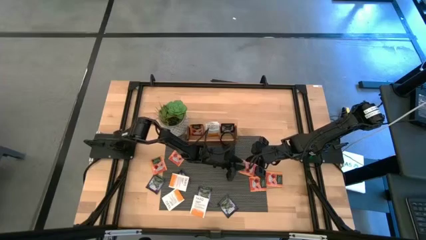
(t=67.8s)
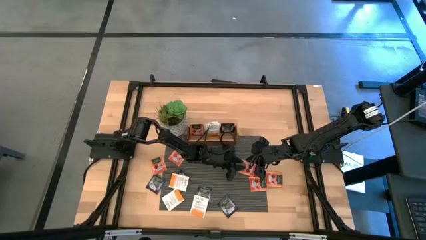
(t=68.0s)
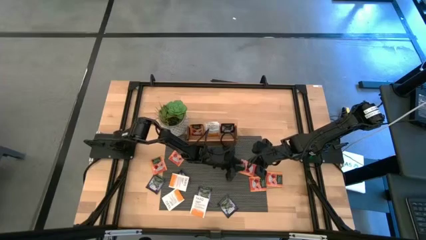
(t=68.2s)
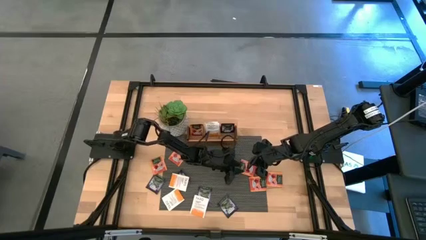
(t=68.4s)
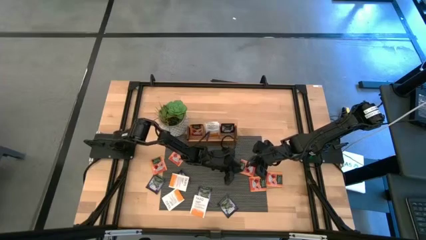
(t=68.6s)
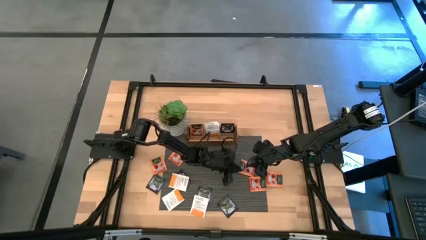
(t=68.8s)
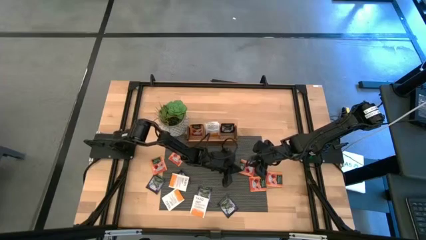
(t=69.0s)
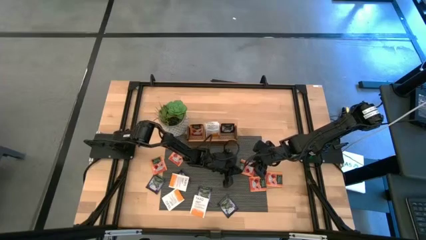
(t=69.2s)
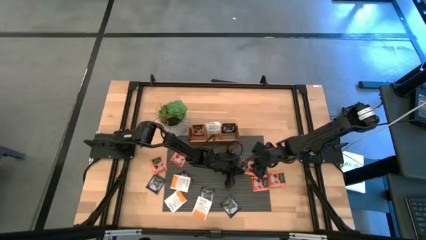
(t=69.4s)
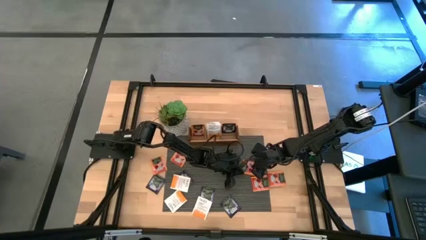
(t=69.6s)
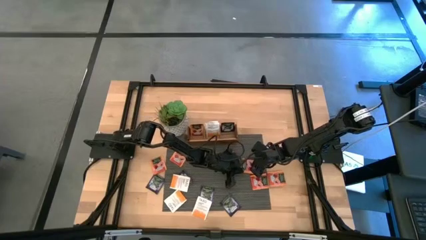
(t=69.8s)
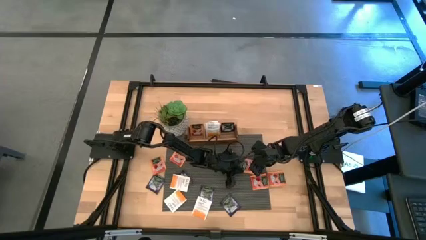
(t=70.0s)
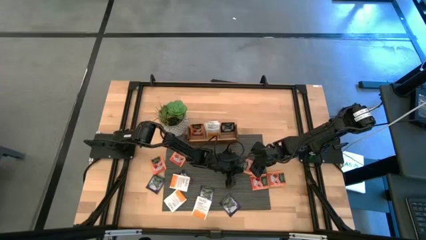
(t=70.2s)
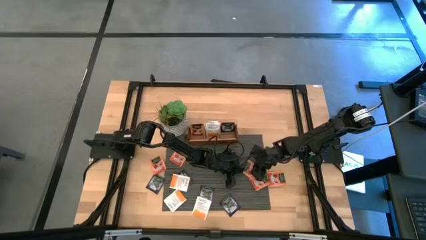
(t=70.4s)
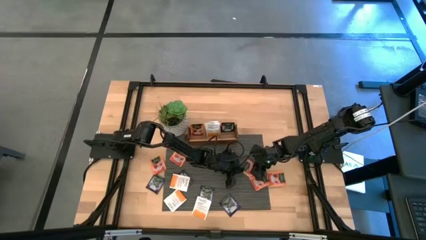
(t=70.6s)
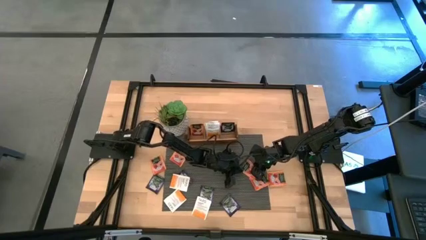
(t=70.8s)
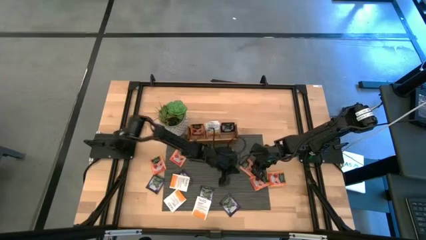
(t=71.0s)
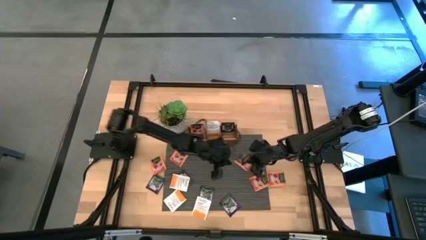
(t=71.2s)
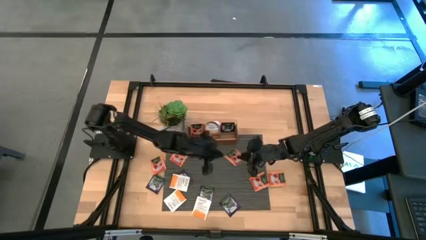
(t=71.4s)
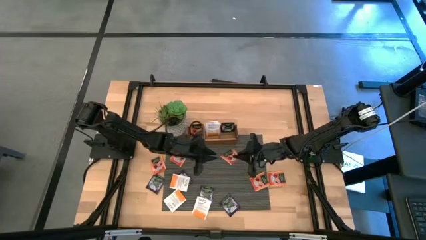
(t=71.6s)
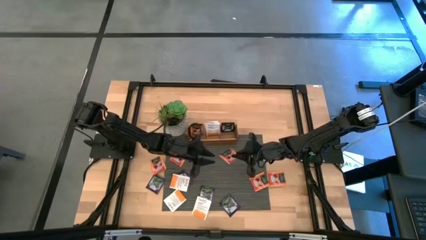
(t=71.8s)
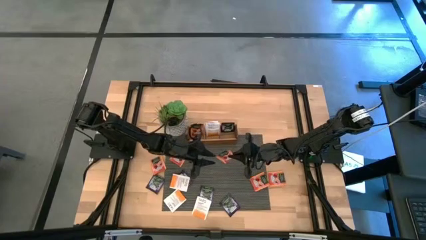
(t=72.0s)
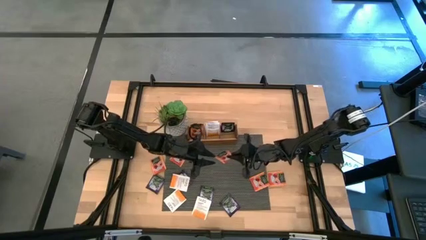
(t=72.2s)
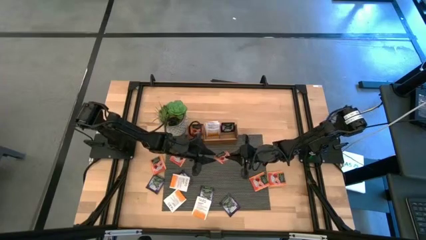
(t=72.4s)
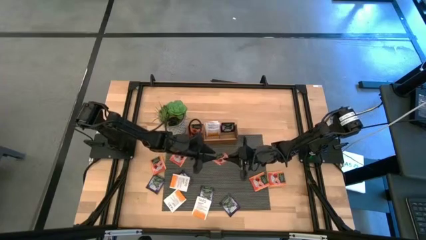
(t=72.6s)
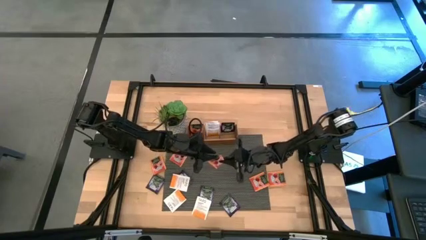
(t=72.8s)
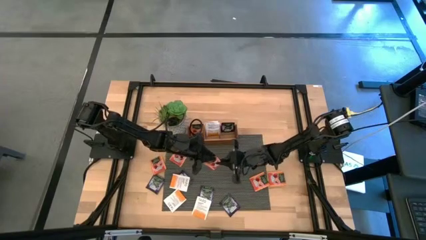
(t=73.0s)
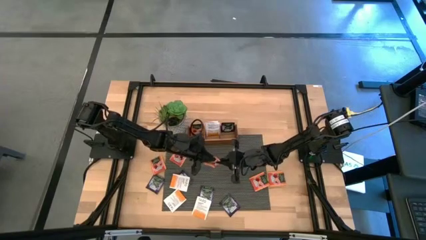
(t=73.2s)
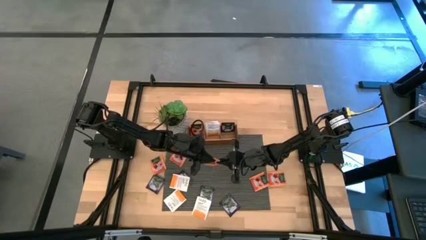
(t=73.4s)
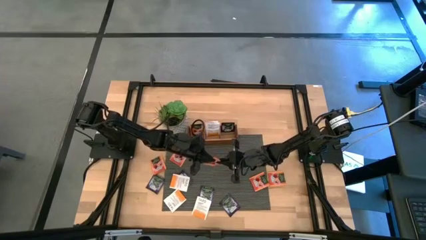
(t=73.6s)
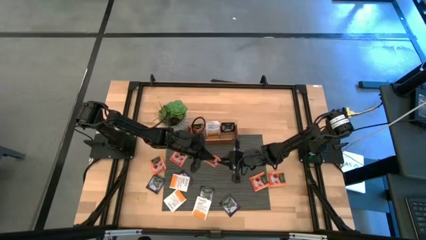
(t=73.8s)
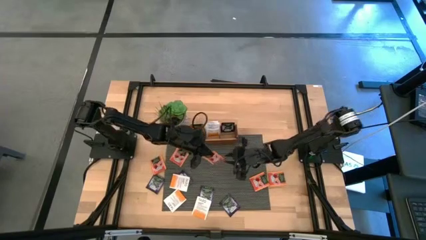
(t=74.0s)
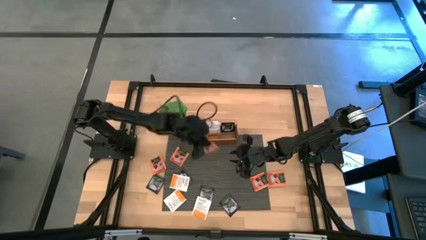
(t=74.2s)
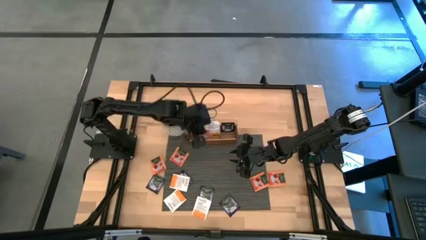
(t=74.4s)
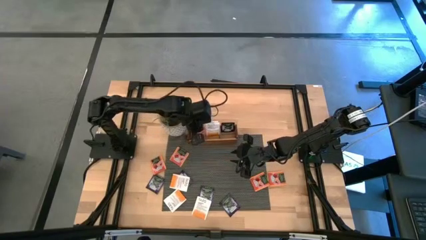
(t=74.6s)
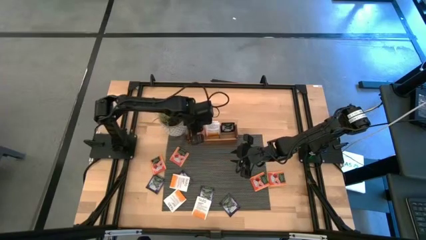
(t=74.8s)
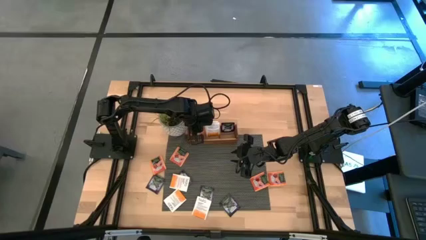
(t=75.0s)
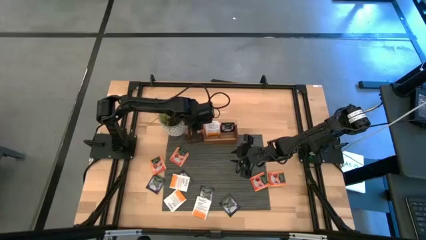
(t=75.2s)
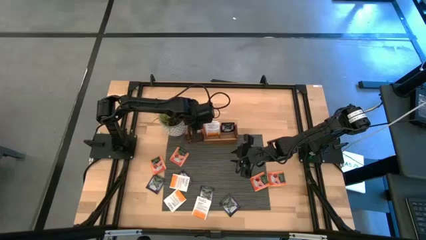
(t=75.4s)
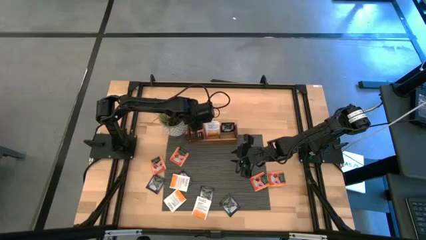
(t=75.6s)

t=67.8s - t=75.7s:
Task: Pick & Place Tea
Put the orange tea bag into the left slot of the wooden organizer

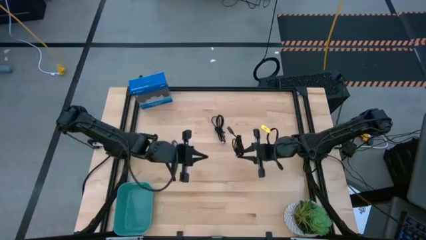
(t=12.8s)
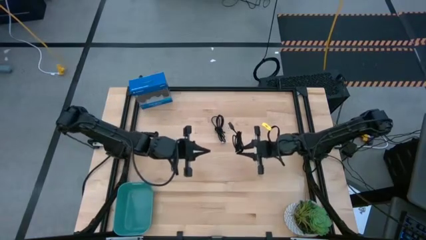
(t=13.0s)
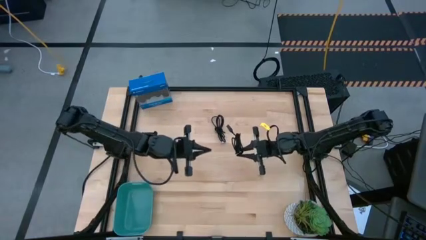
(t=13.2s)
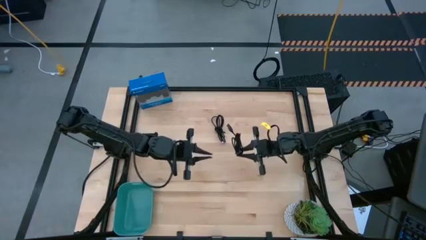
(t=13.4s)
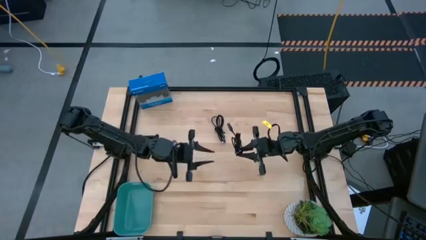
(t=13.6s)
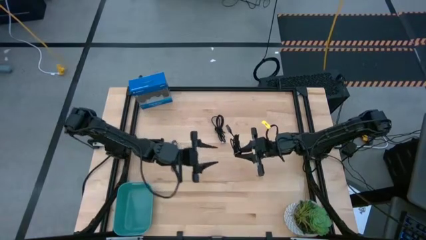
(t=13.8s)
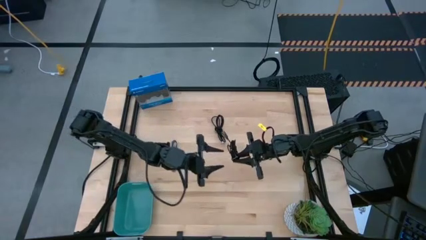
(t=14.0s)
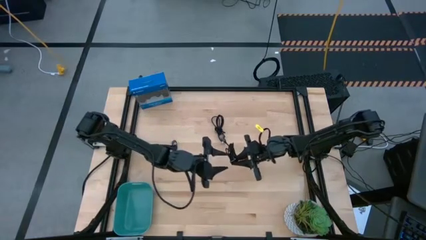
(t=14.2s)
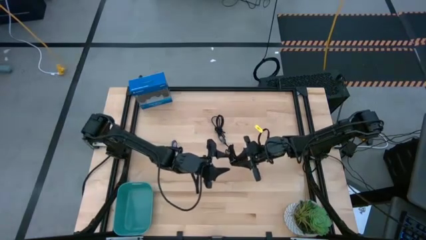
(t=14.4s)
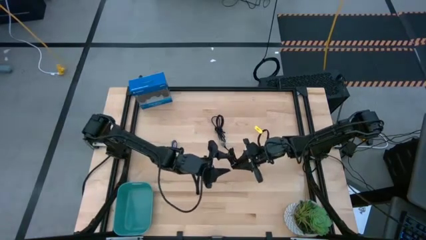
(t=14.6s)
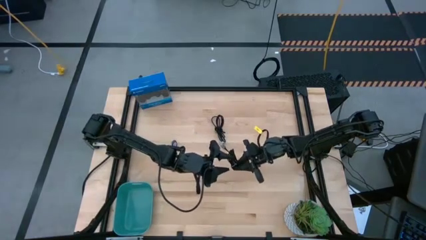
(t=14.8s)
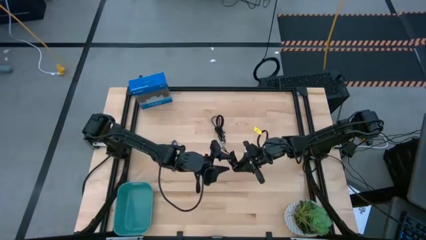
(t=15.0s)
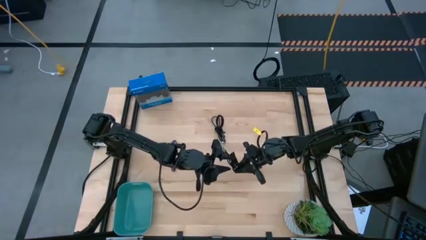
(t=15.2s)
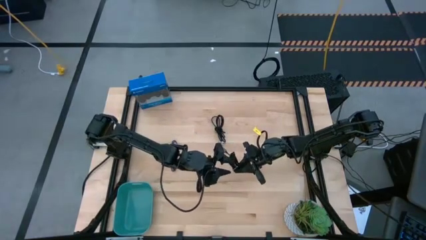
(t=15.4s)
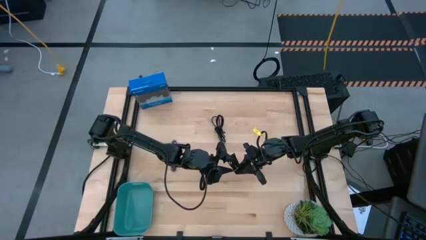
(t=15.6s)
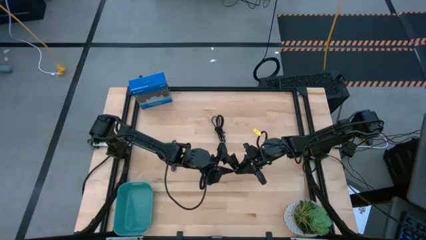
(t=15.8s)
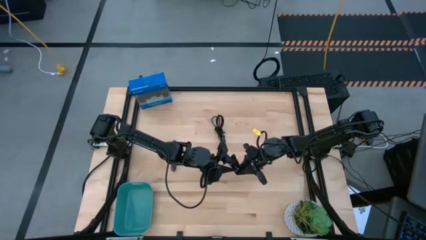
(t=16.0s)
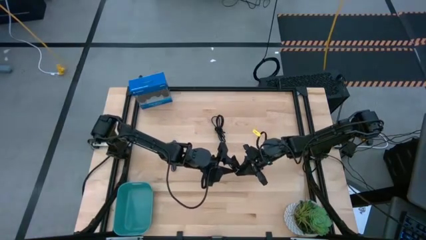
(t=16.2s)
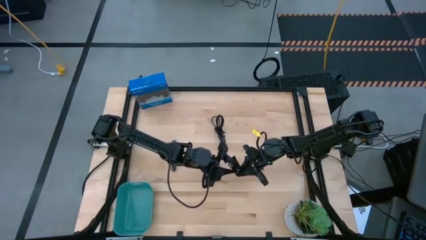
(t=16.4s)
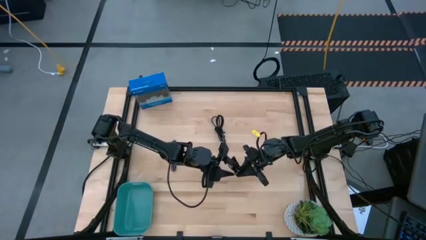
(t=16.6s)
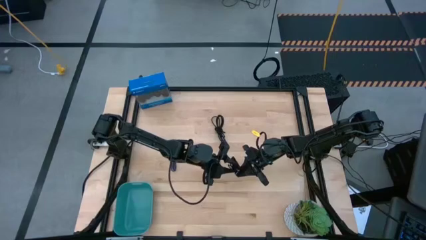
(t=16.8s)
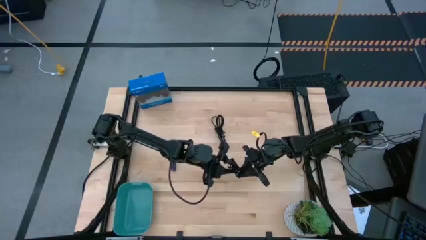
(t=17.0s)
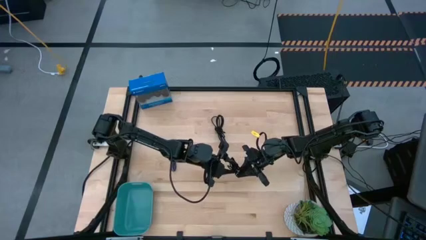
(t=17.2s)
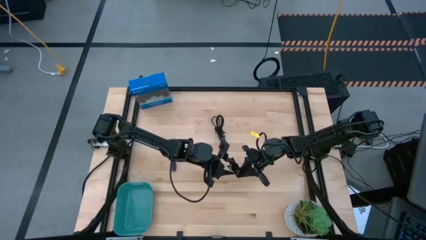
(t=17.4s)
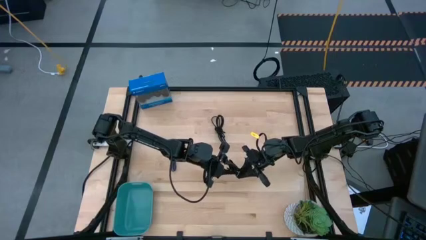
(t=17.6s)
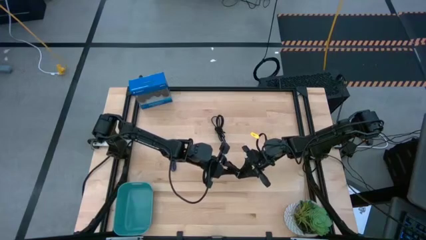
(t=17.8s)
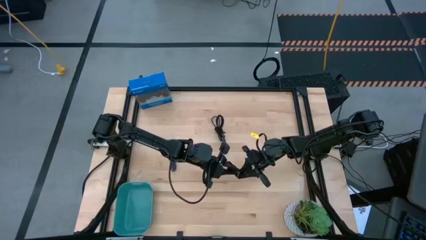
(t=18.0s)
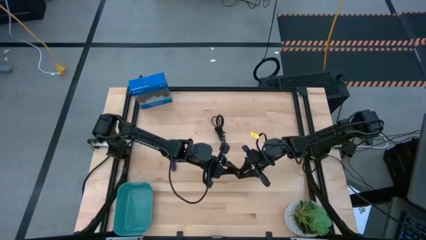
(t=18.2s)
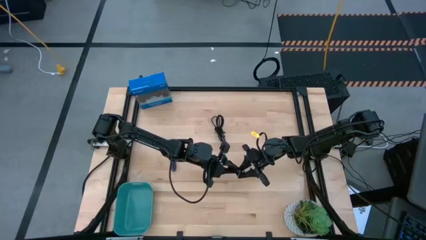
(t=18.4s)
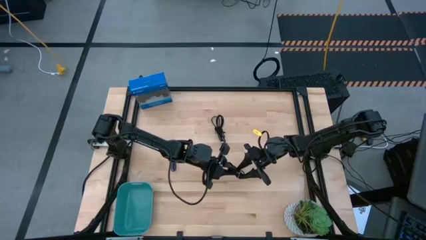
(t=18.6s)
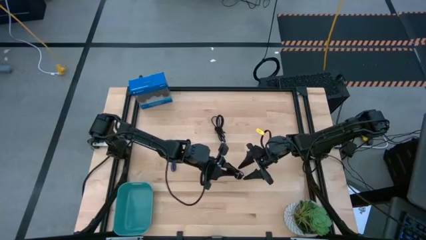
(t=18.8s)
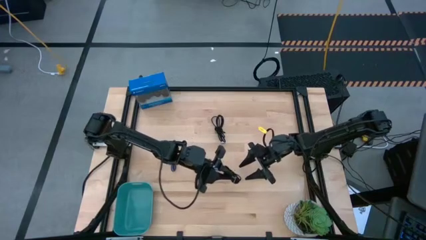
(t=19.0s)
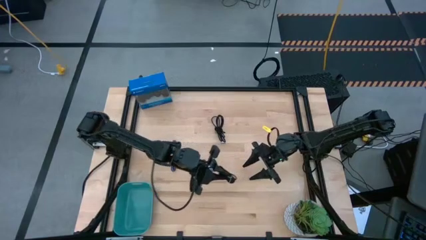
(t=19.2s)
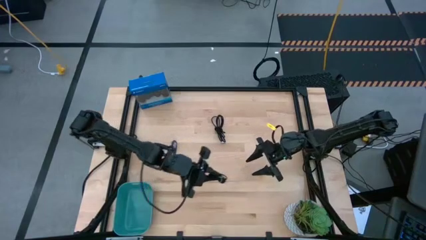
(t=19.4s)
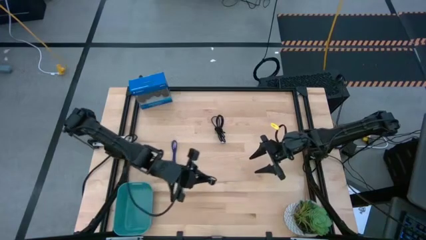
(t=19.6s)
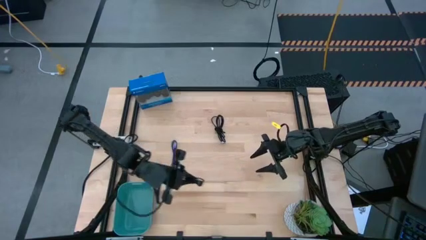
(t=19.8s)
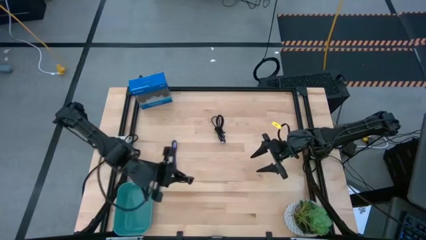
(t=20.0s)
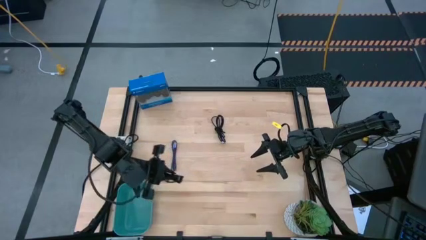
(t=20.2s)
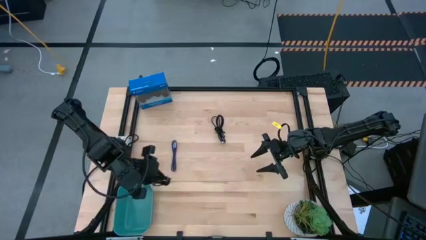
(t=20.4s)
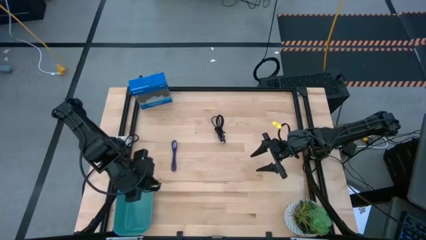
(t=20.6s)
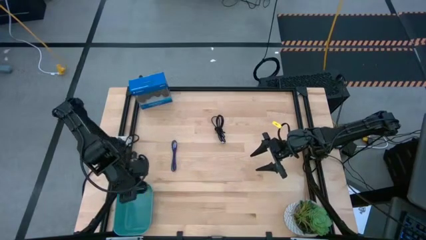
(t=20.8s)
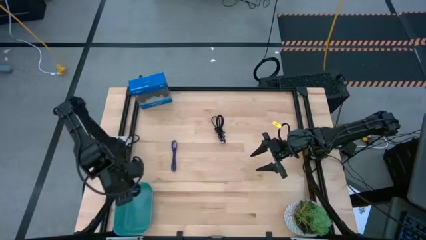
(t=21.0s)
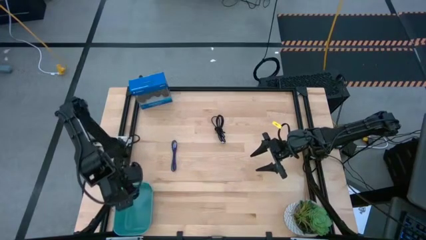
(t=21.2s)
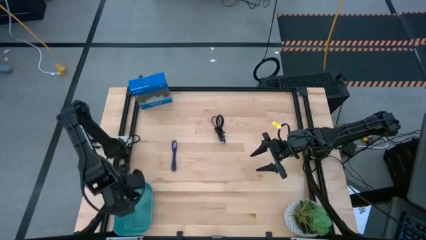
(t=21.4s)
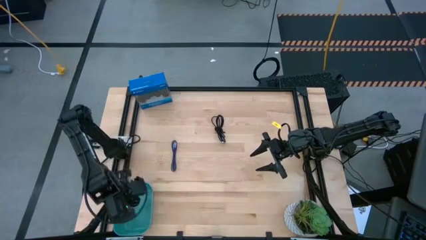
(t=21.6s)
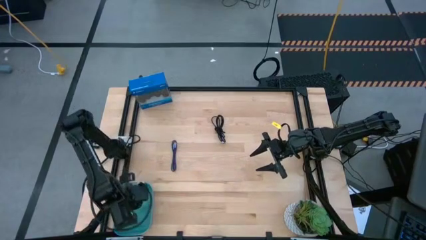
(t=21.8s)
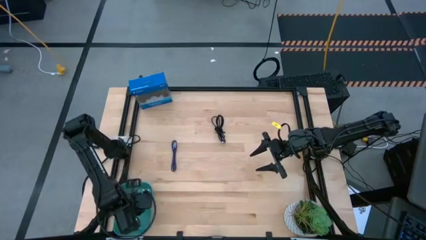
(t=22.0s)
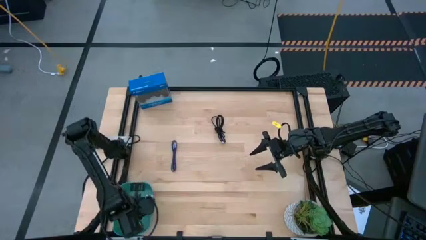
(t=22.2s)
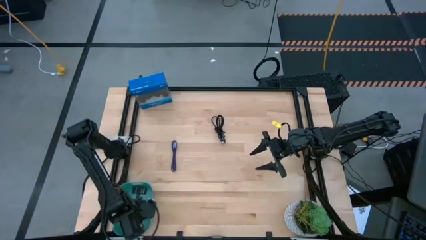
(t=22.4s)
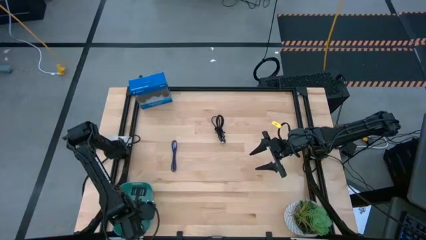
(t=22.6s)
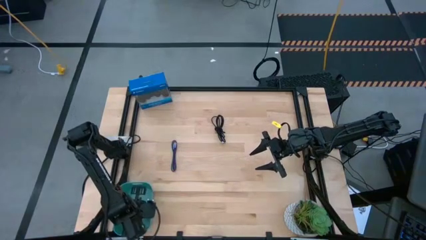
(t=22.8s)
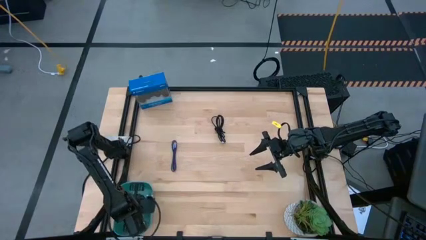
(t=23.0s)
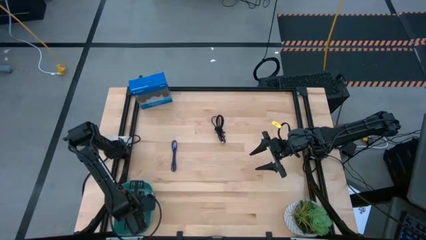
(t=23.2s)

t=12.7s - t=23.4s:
Task: Pick and place USB-C Cables
Put the upper black cable into the blue basket
